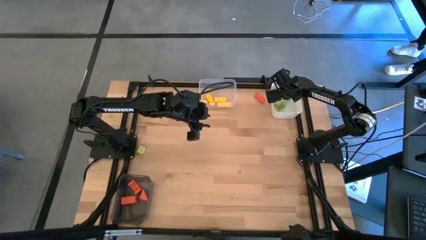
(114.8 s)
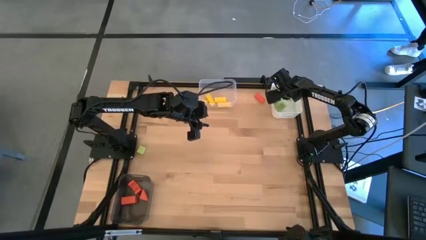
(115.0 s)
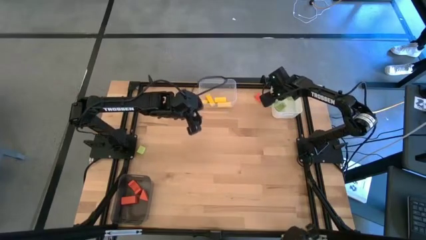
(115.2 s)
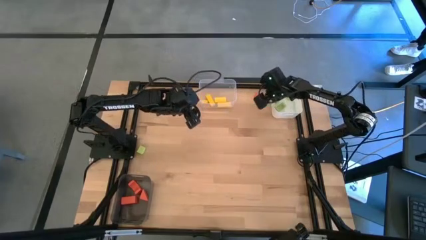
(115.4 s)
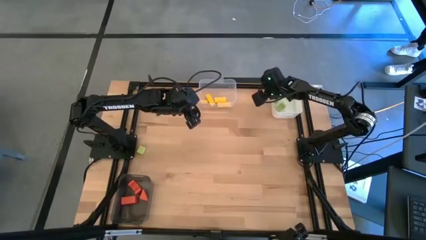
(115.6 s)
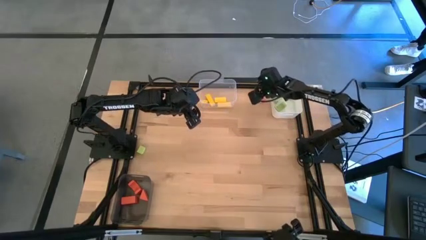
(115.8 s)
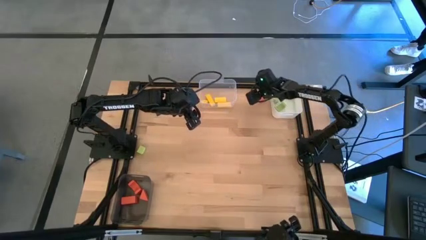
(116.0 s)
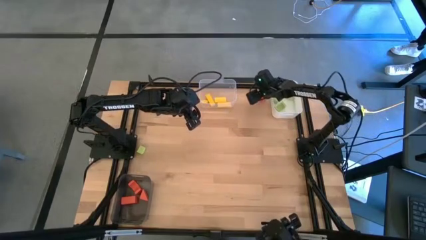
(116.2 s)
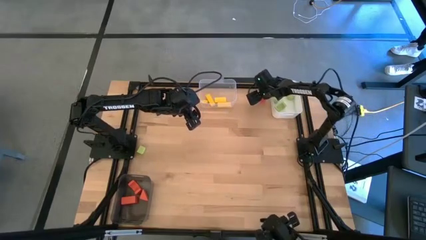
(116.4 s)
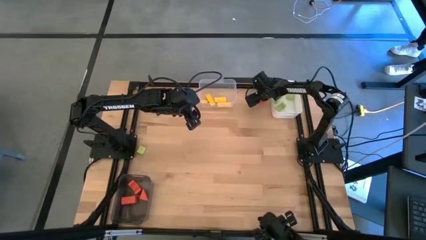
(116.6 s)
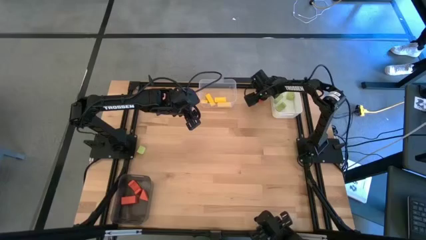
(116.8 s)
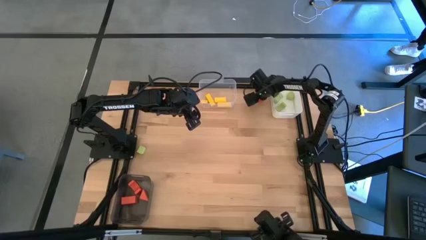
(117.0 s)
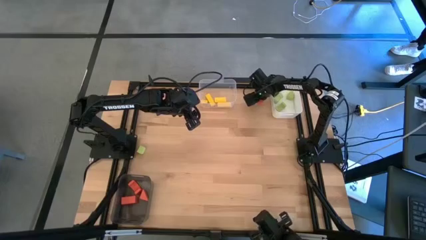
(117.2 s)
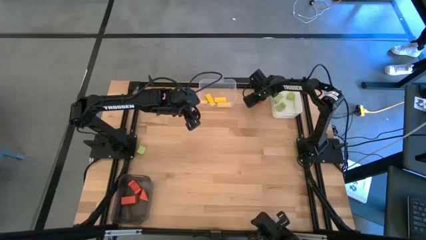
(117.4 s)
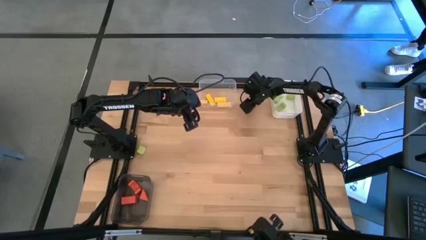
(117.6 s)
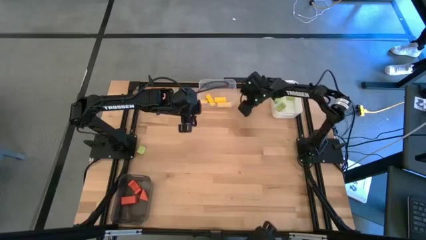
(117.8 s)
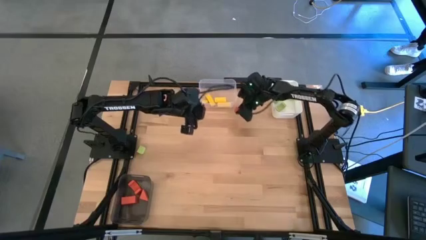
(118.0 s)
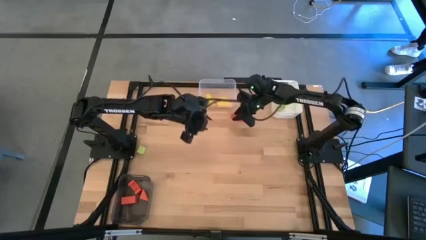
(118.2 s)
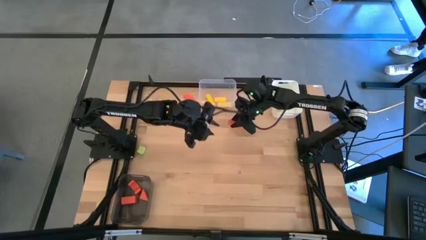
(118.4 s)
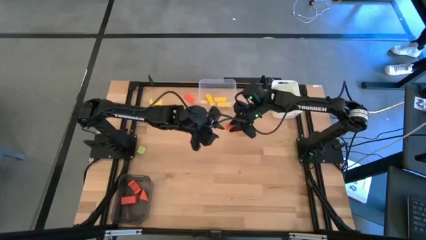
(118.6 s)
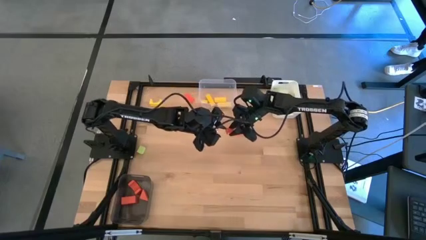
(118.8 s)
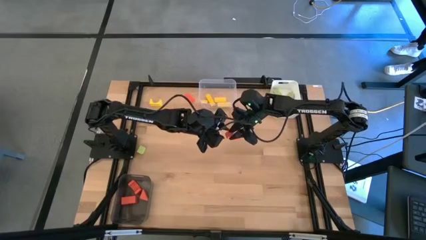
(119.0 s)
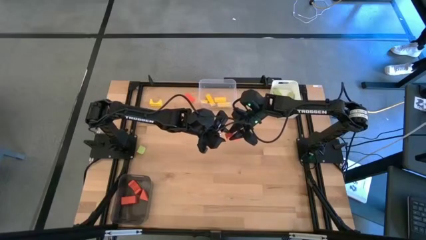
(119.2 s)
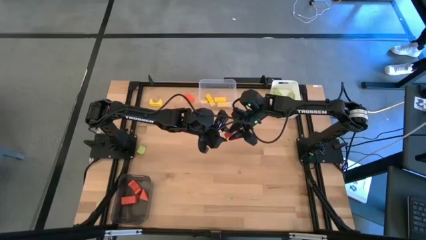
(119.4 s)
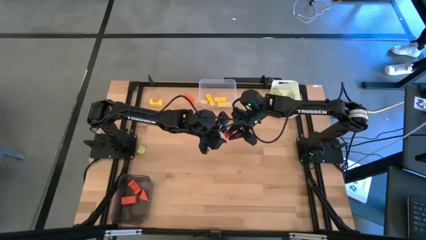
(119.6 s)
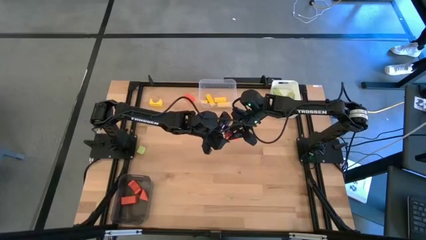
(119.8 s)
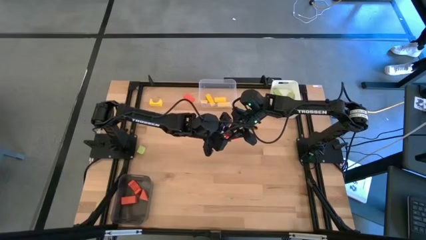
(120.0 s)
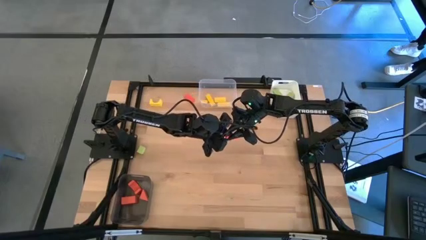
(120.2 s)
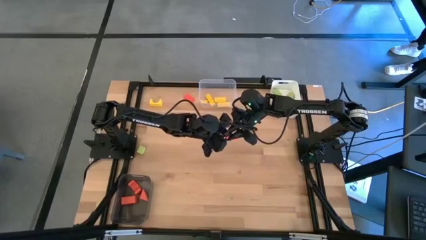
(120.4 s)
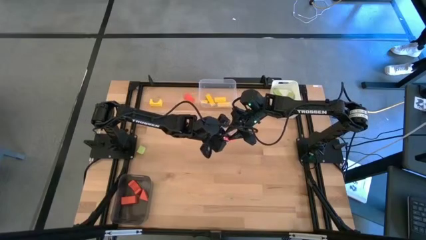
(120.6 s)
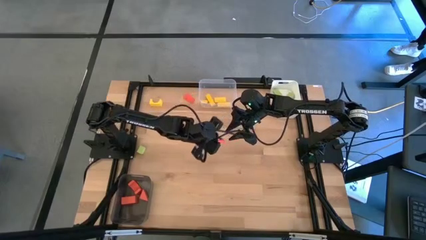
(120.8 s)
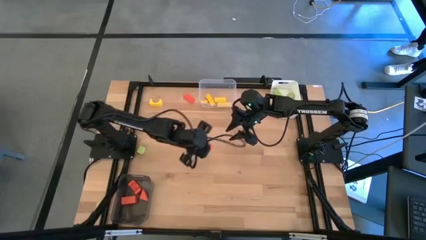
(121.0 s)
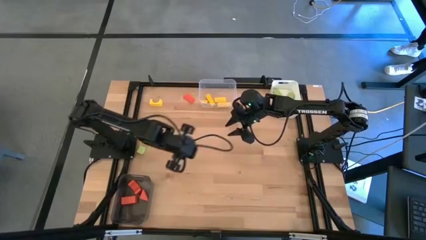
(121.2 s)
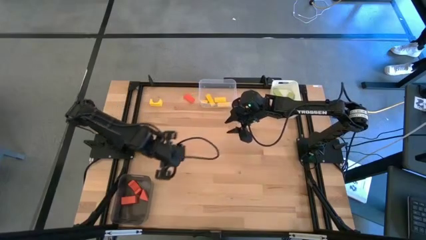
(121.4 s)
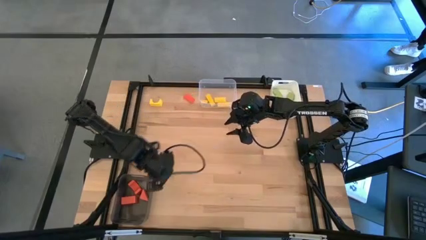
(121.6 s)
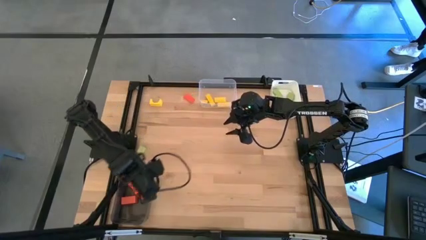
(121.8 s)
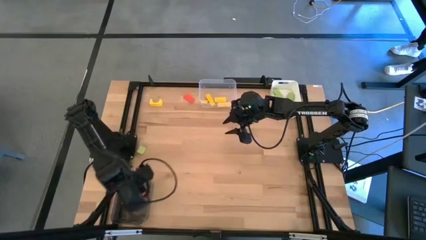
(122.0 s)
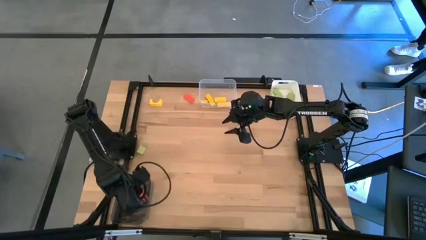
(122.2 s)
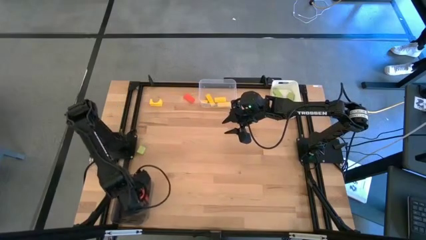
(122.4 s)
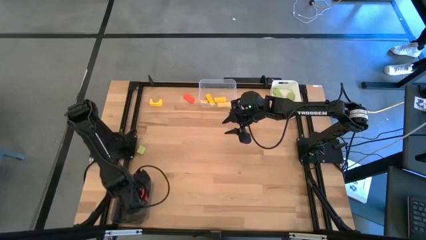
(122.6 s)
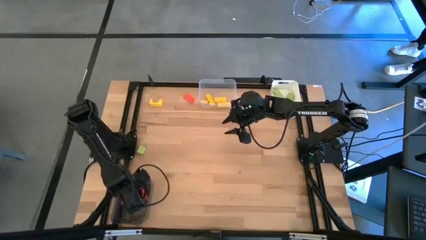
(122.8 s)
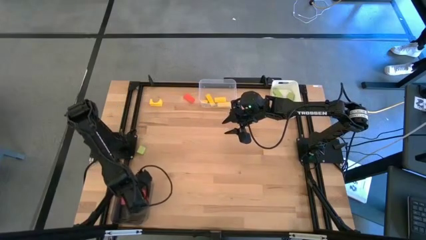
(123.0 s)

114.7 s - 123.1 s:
Task: Sort & place blocks by color
Put the orange rectangular block into the black bin

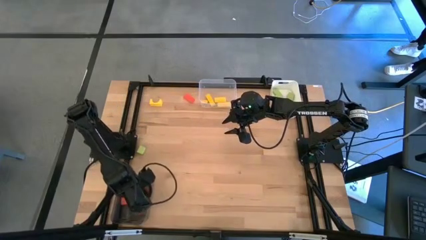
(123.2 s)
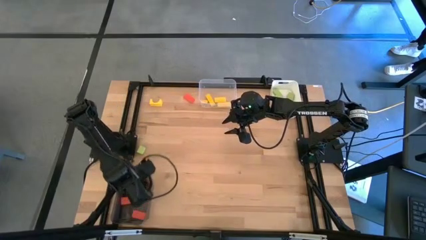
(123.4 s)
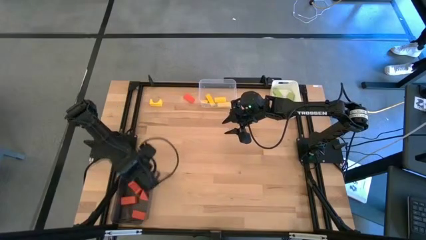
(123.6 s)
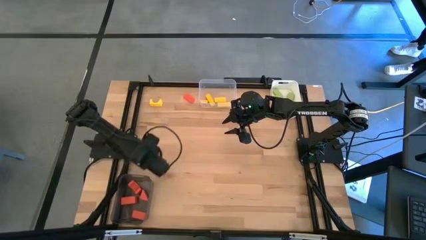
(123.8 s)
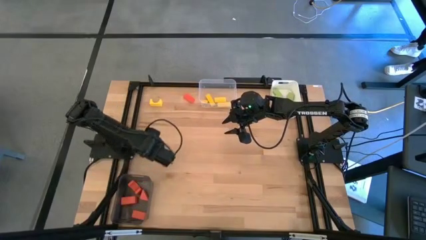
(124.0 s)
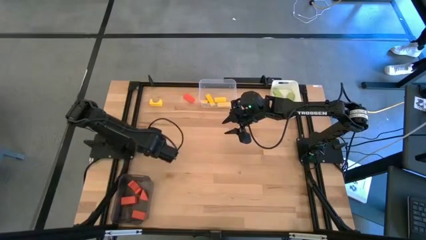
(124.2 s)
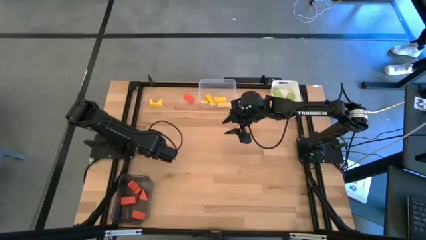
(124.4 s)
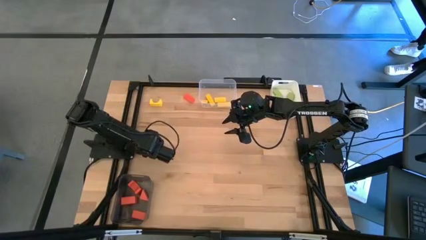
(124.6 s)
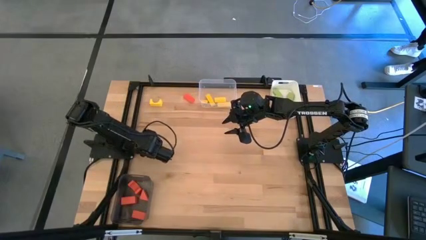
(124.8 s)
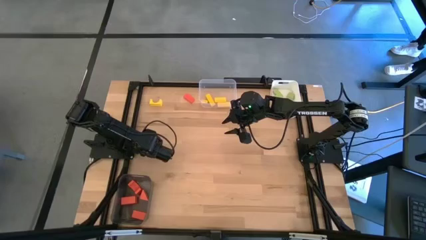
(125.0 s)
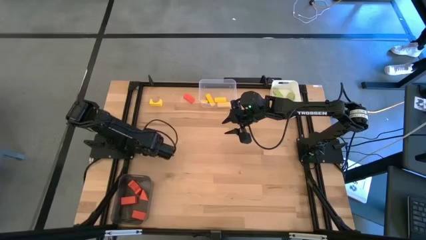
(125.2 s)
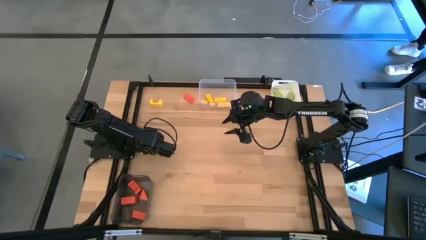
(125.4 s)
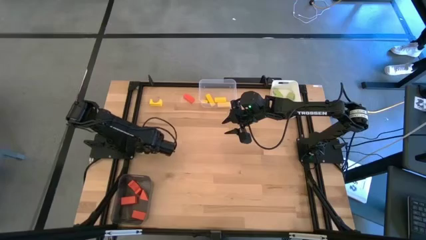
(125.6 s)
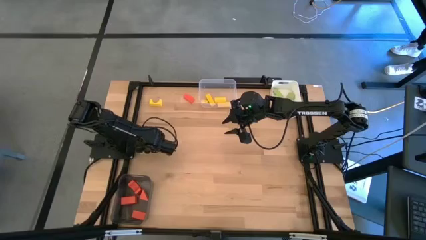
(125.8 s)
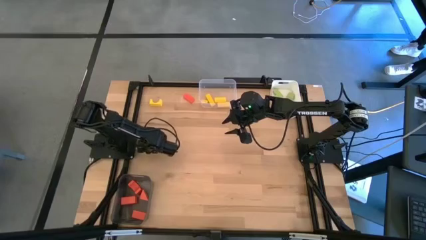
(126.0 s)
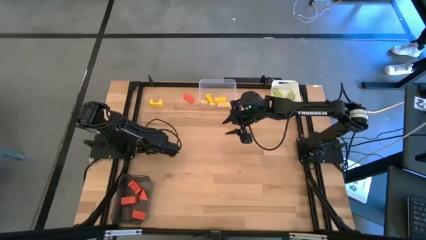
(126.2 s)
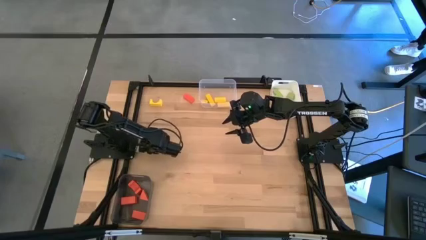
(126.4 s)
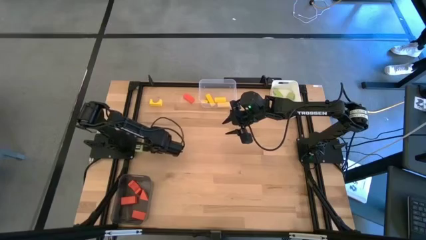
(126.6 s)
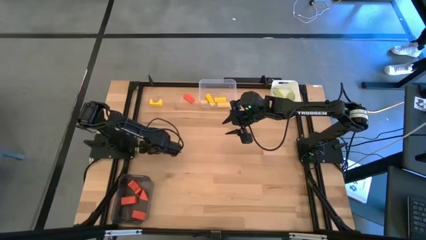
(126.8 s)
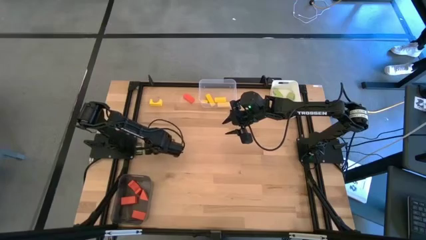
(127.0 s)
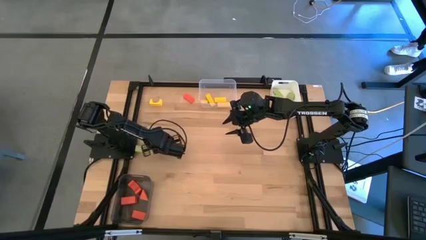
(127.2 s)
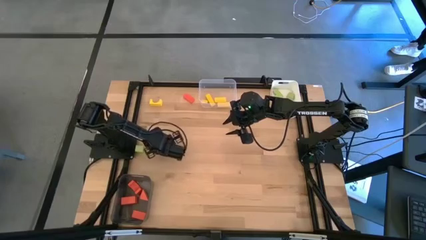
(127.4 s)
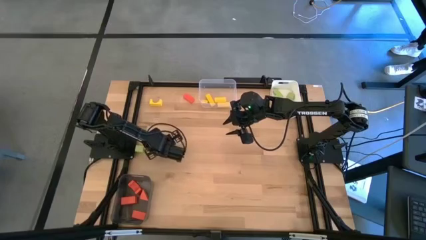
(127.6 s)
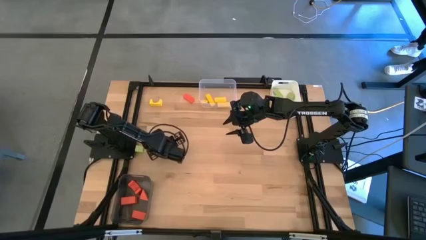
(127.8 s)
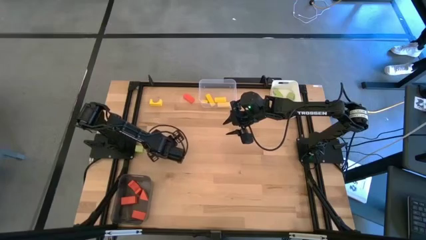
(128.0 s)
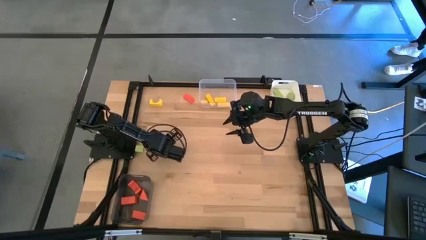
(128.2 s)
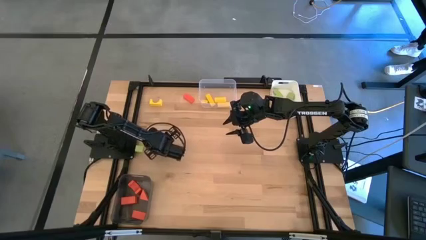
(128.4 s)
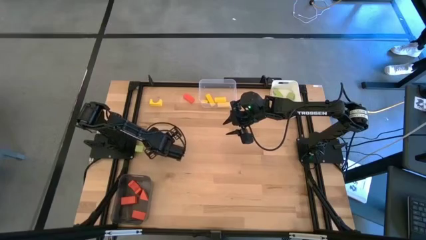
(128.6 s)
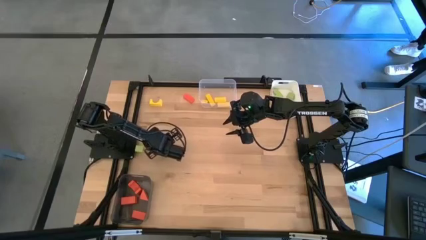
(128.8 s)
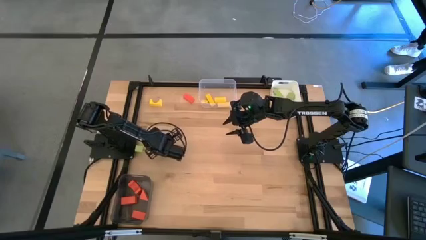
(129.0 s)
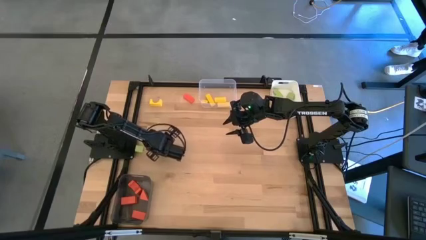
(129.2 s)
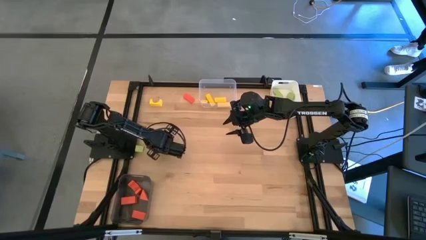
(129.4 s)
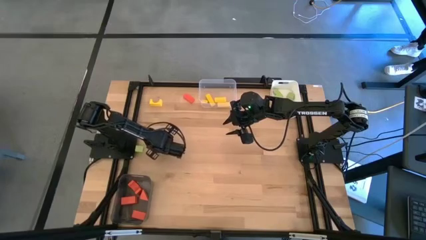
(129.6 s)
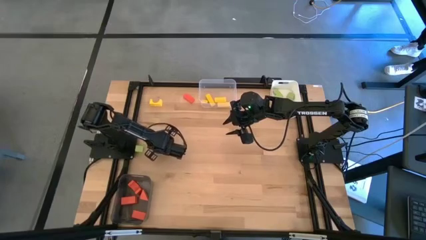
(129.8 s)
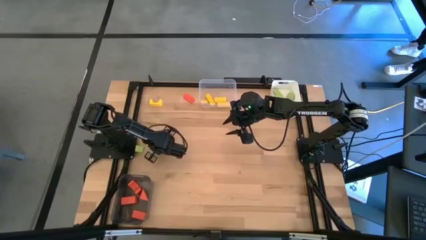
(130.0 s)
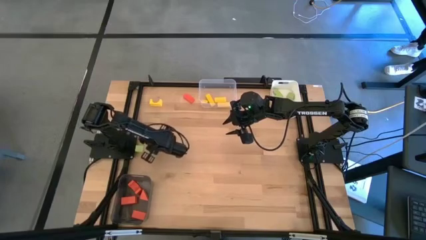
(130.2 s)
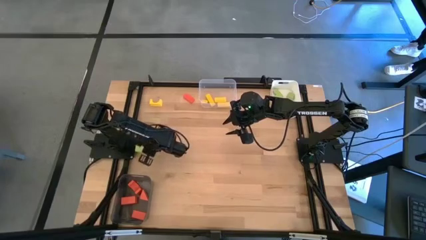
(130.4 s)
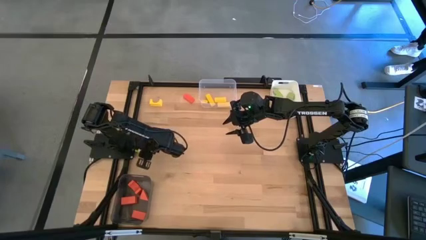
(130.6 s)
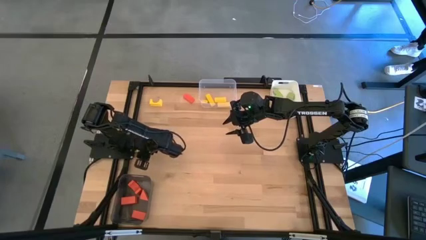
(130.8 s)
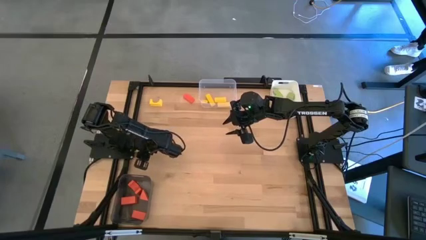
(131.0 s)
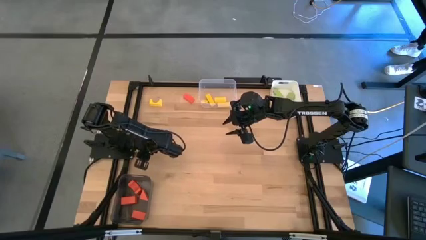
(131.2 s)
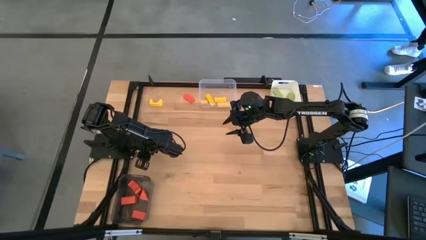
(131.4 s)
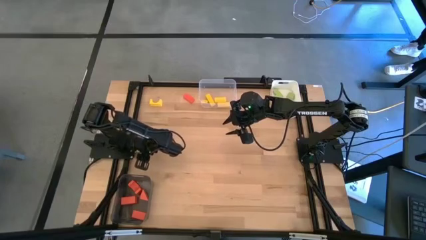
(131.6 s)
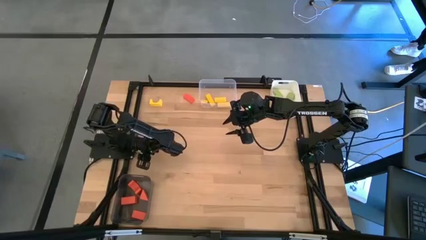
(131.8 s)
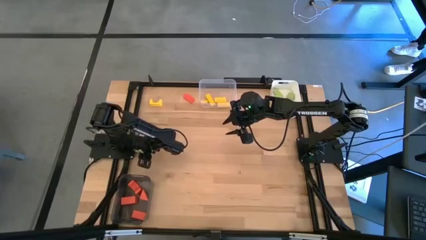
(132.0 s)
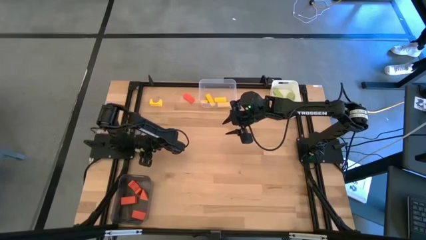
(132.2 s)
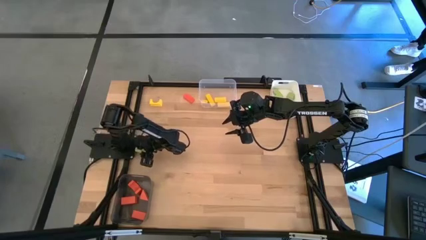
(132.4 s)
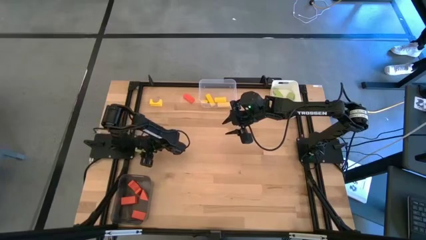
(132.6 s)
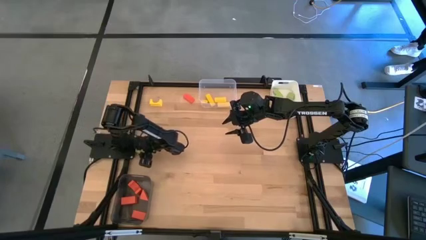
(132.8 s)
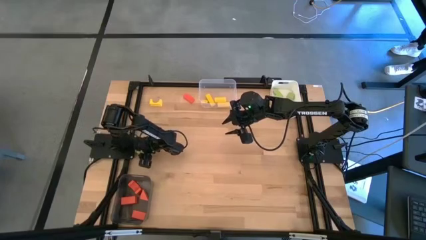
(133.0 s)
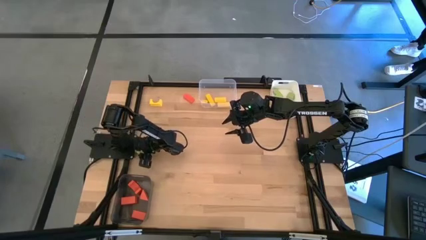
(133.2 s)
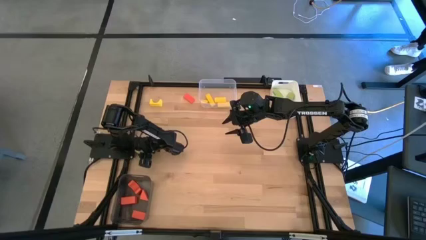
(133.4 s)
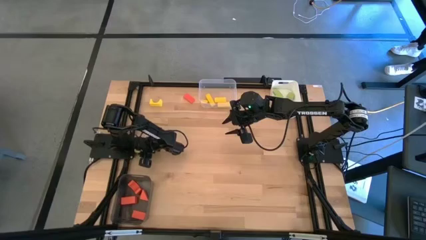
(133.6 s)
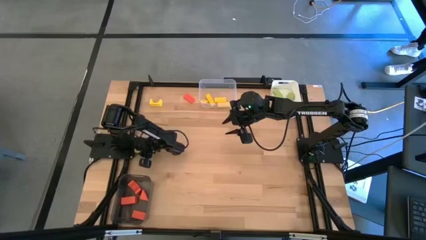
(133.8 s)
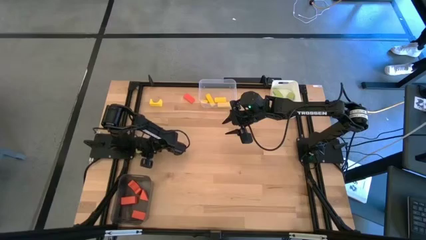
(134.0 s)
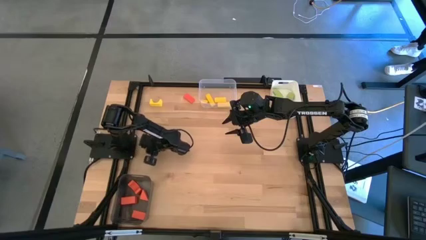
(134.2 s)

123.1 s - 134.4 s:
Put the green semi-circled block into the white bin
